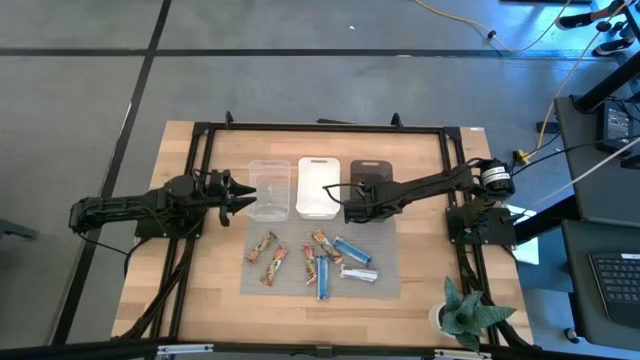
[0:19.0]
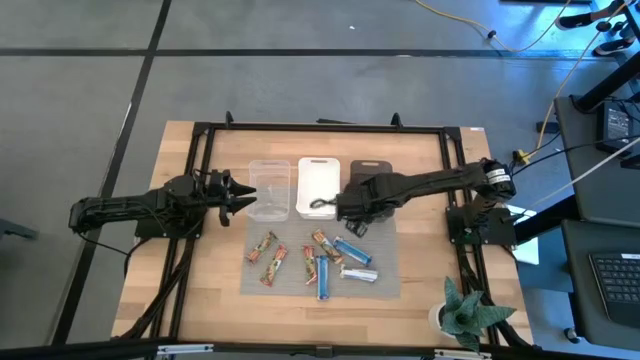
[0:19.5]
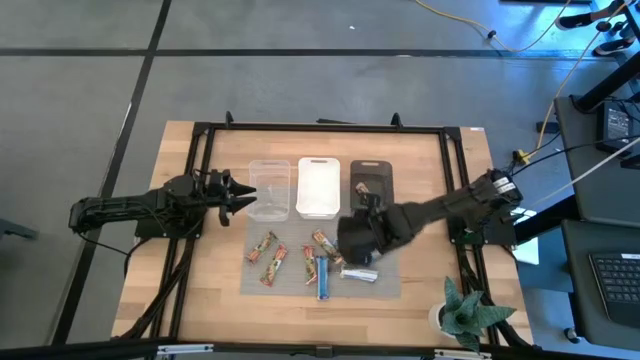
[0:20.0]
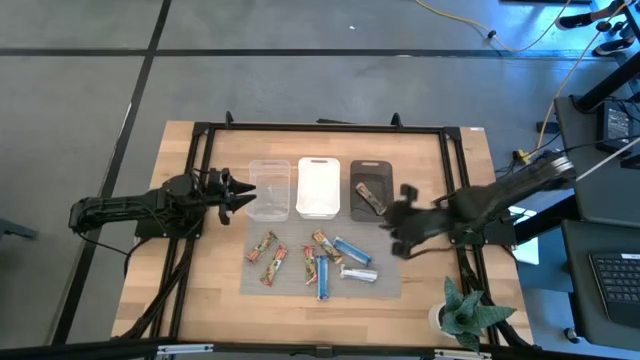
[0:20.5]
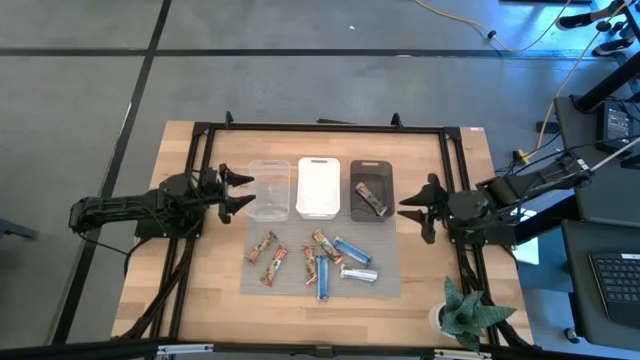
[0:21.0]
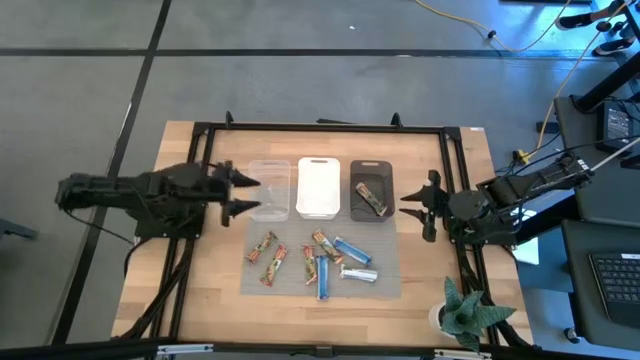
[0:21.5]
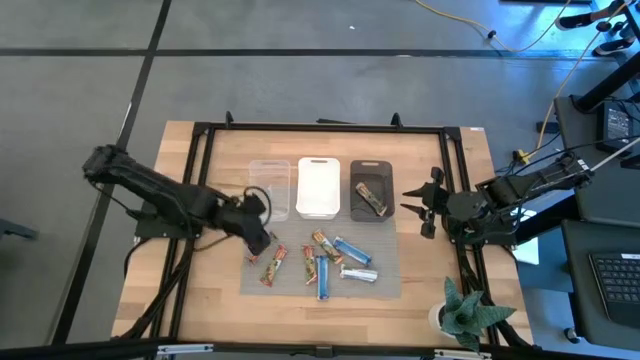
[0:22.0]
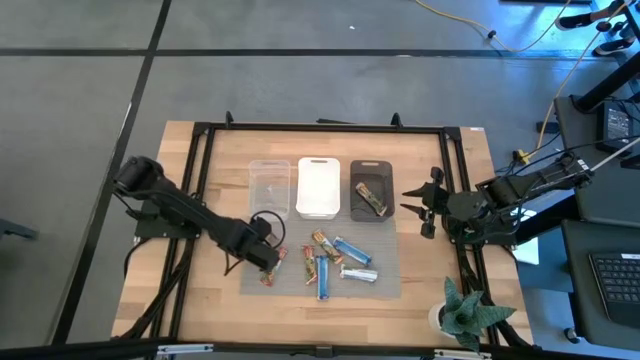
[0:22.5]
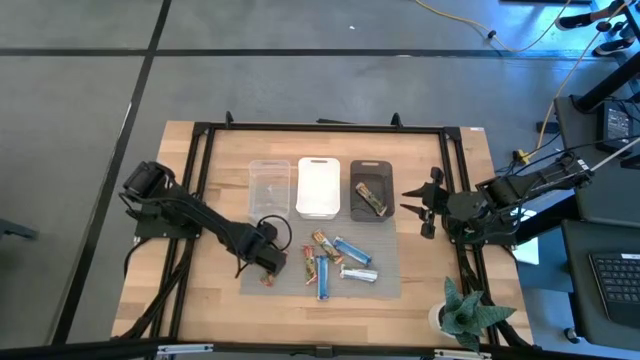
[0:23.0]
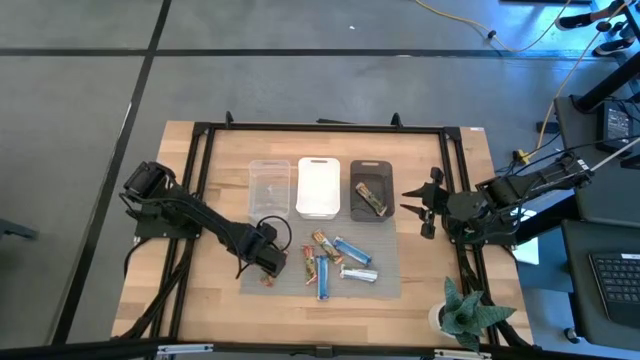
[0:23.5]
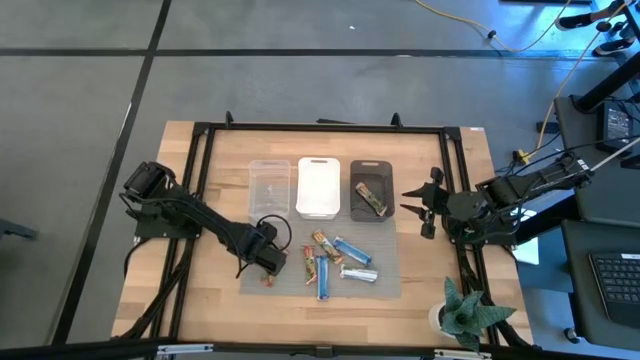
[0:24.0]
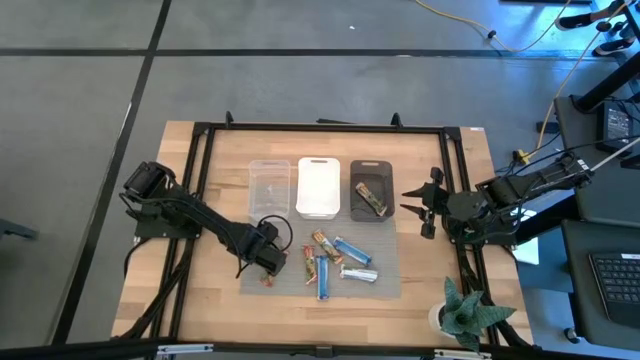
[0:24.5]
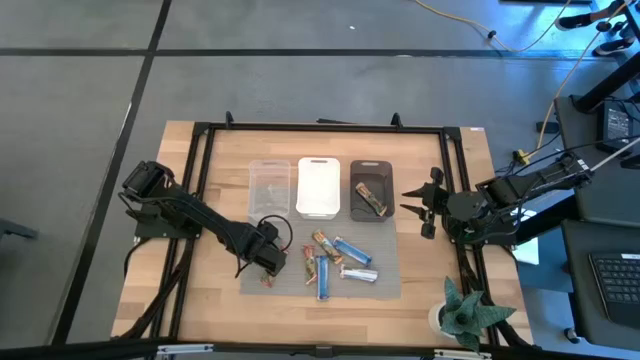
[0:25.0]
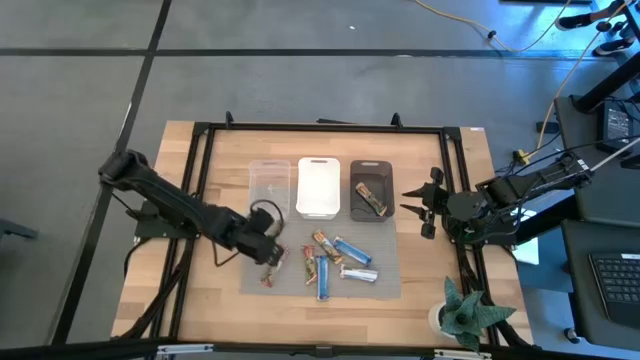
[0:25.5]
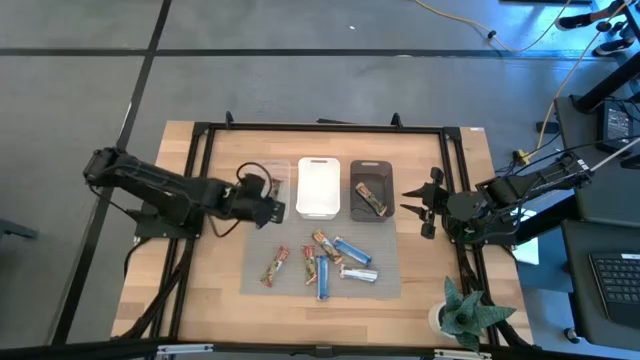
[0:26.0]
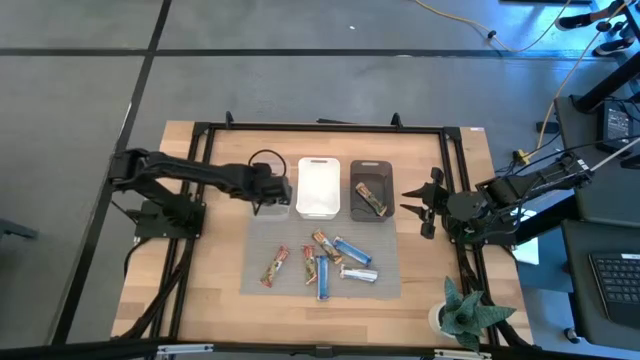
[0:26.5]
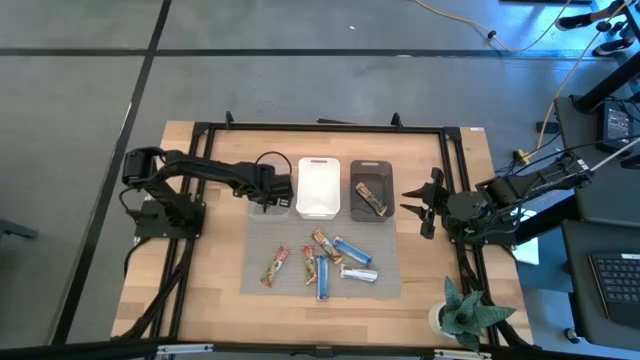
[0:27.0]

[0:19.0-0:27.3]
Task: Pick and place Granola Bars by type
Put the left red granola bar into the transparent bin

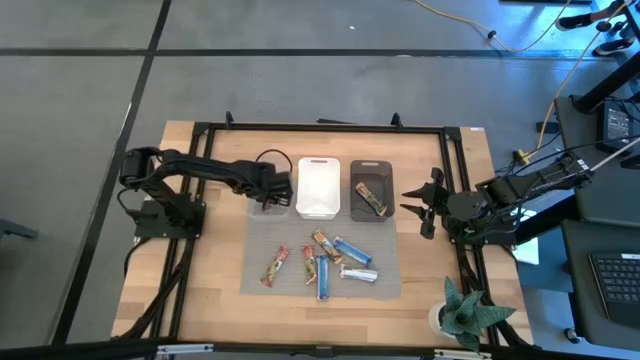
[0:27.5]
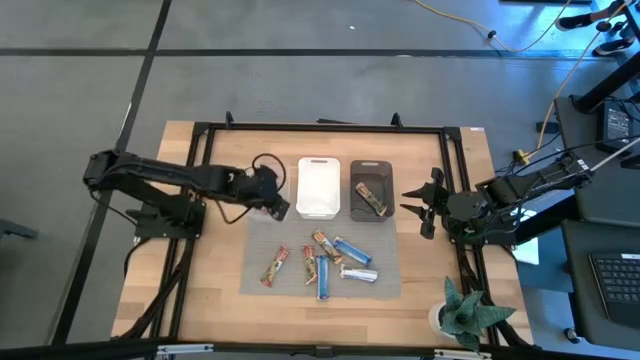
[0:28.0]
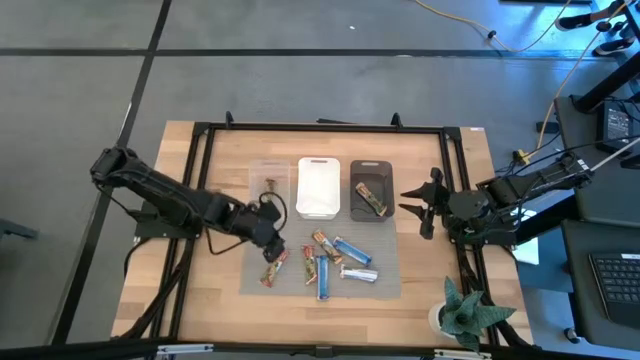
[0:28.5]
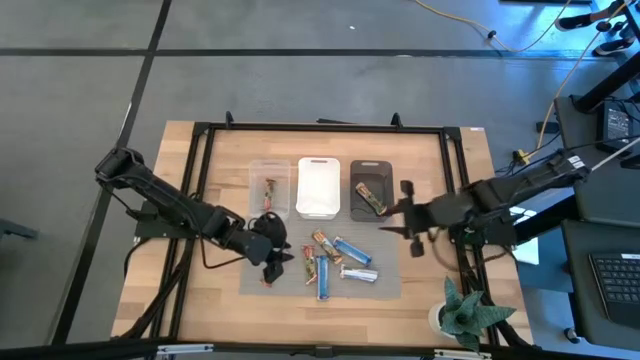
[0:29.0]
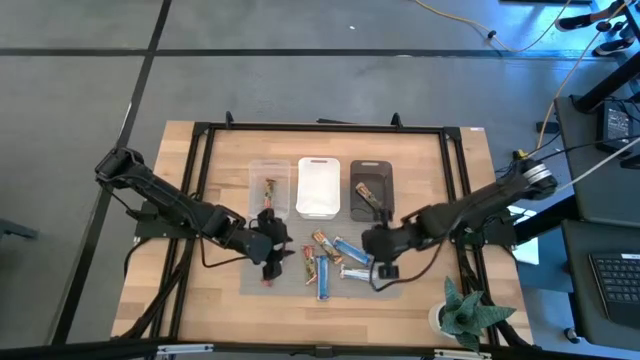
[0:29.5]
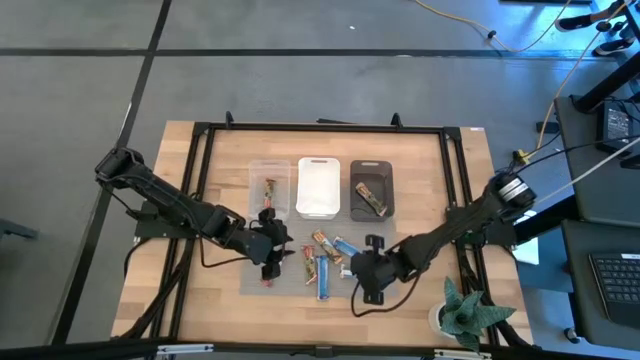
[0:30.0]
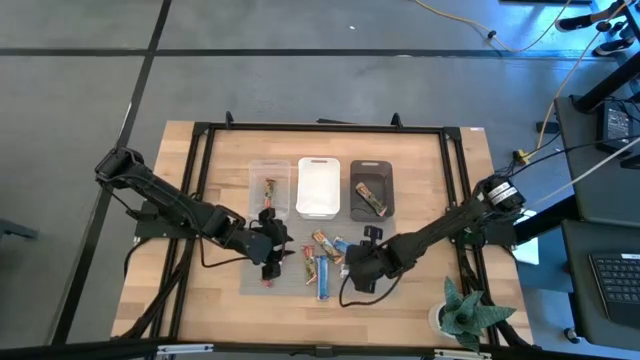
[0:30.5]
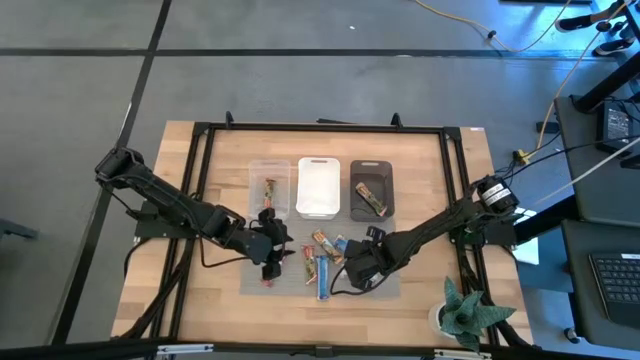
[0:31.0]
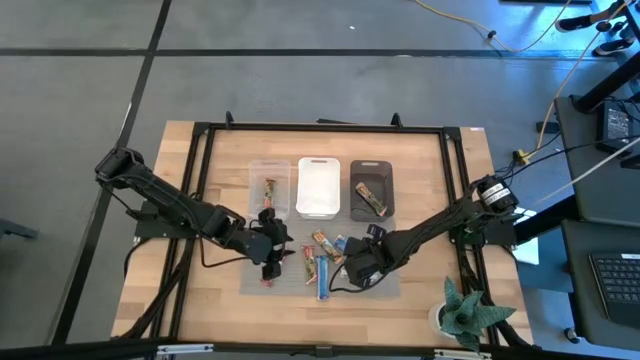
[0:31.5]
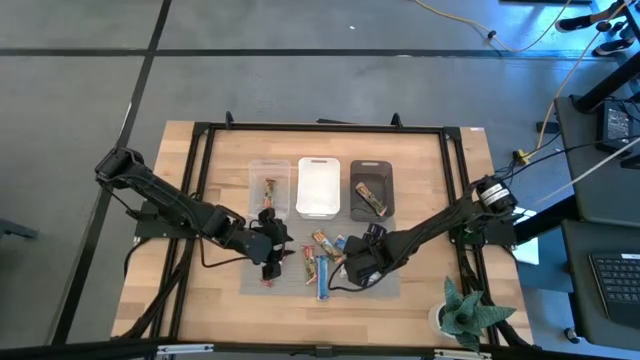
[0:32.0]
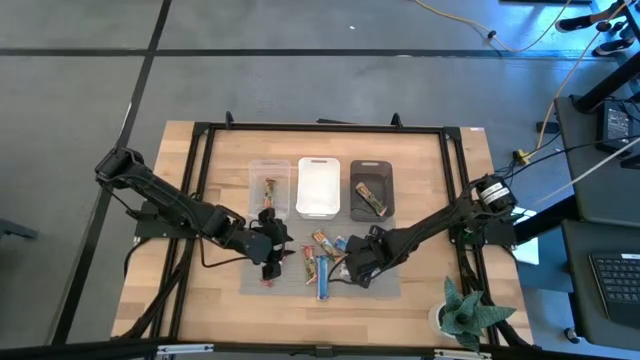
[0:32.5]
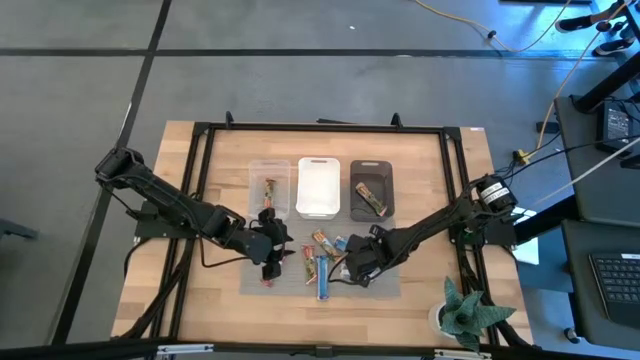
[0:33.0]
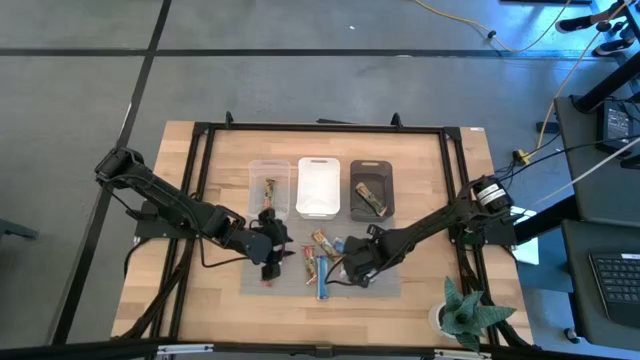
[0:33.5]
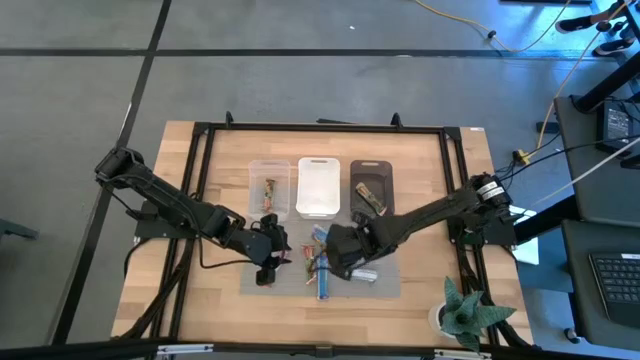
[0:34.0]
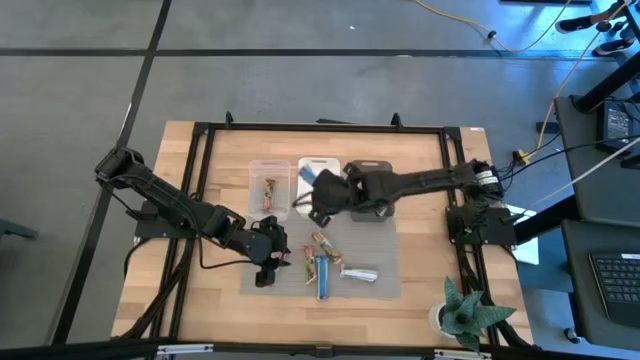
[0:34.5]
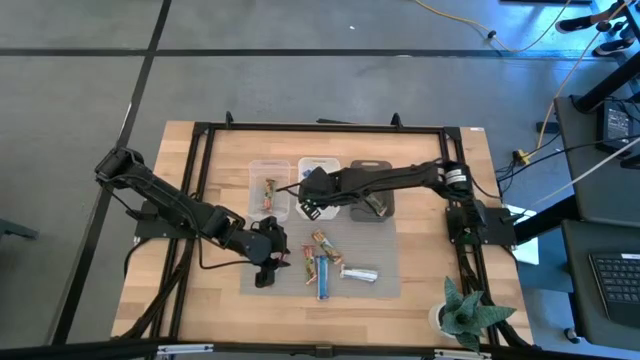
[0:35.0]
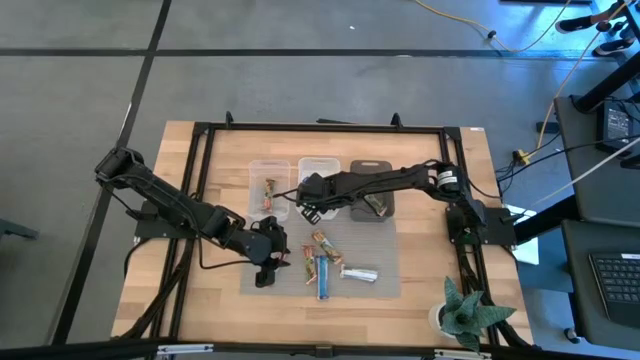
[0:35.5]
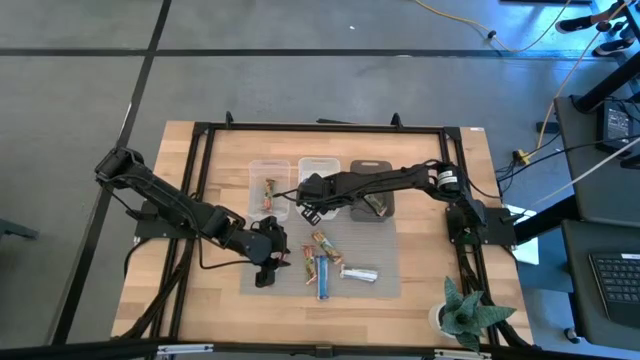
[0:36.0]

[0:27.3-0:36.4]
Put the right blue granola bar into the white bin

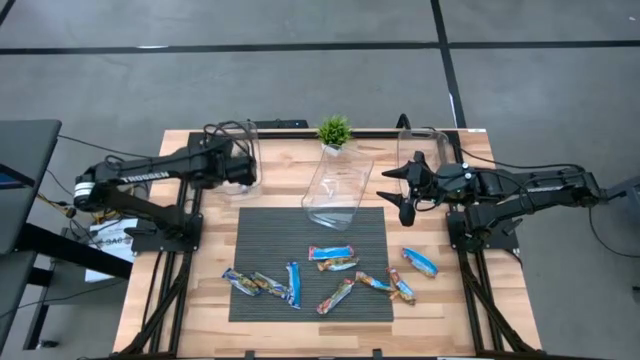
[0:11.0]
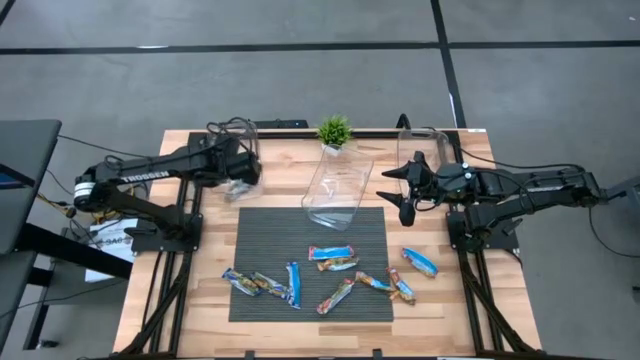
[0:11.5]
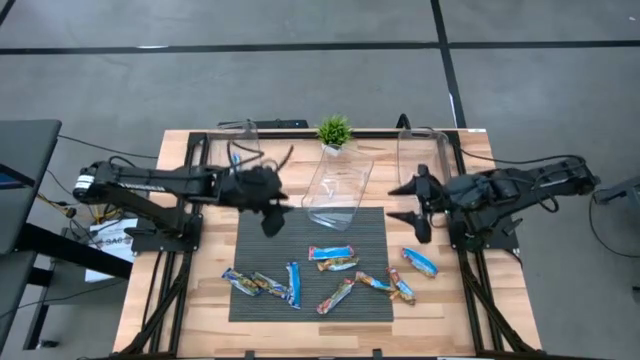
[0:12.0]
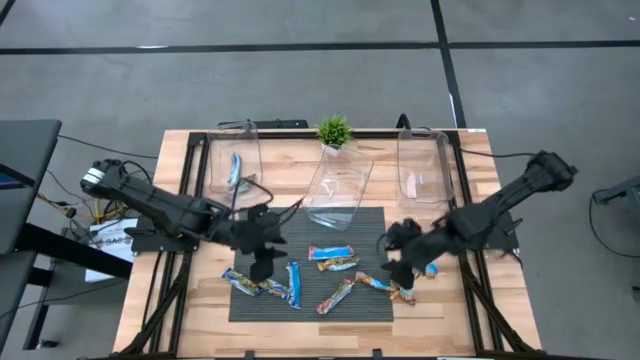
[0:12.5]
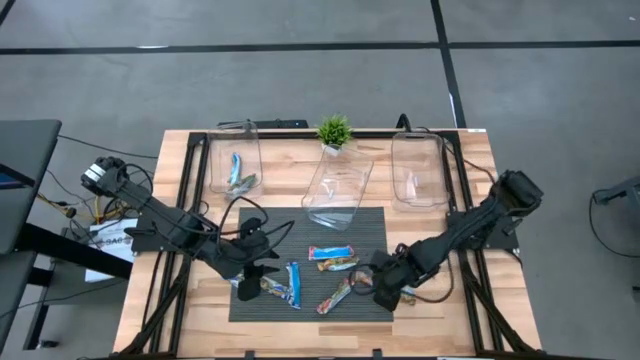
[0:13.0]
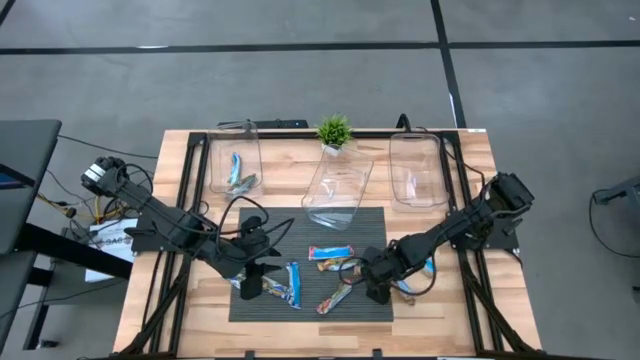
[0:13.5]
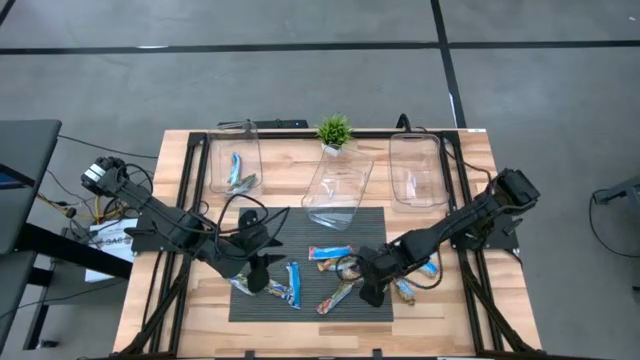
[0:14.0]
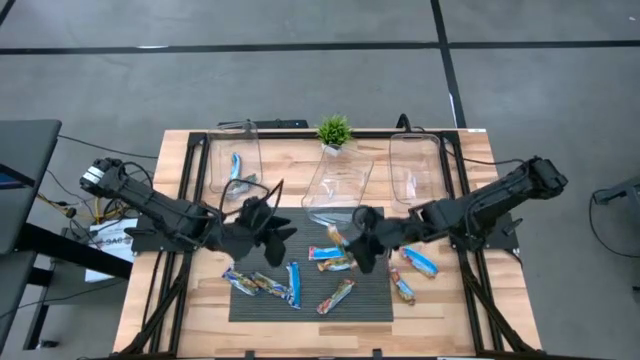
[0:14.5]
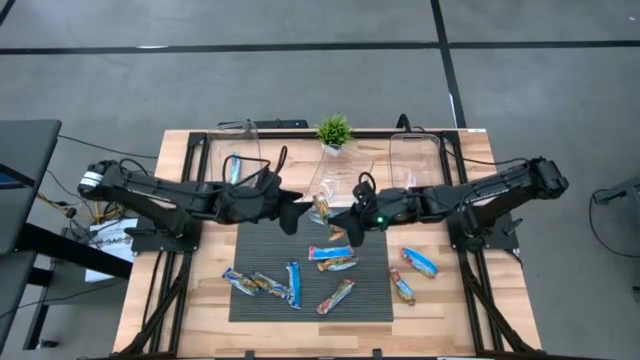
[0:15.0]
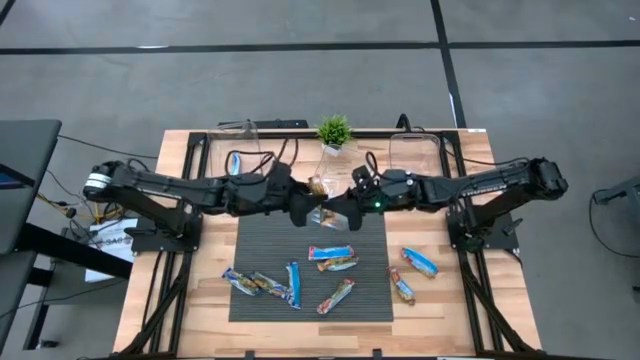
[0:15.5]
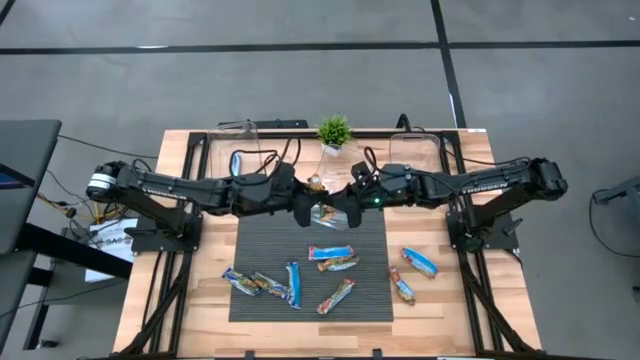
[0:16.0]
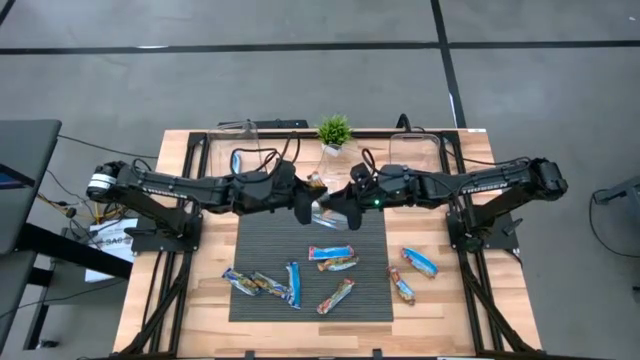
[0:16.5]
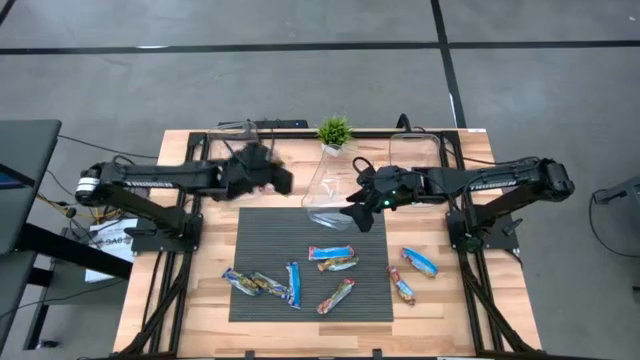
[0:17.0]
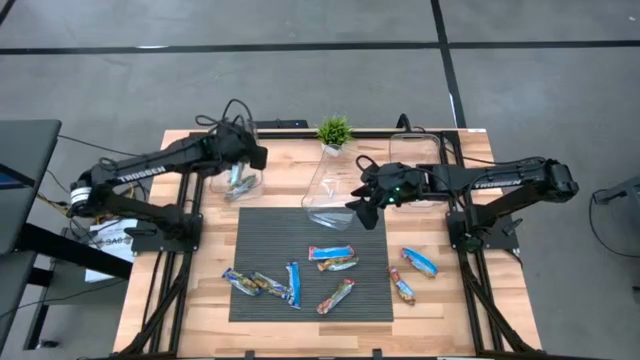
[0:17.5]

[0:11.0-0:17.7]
Task: Pick and place Granola Bars by type
Put the yellow granola bar into the left transparent bin
